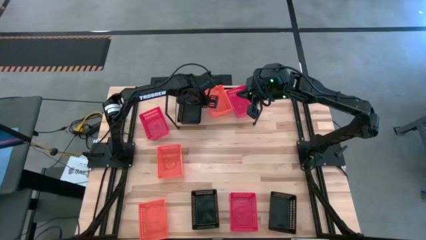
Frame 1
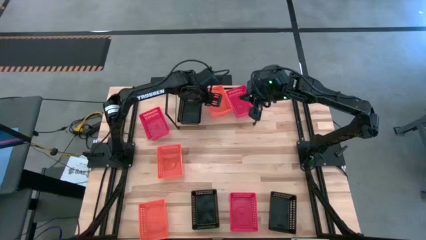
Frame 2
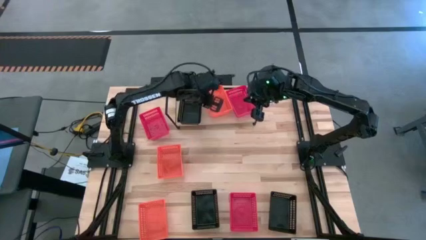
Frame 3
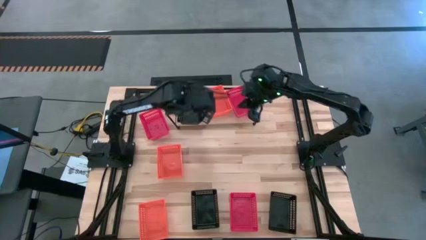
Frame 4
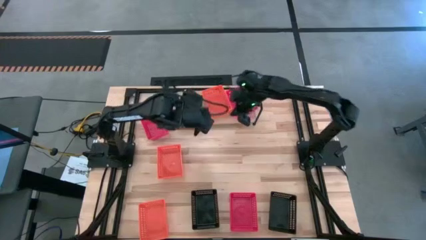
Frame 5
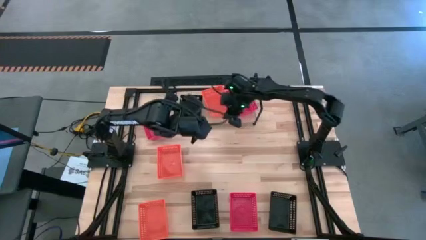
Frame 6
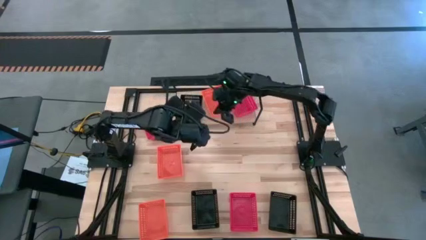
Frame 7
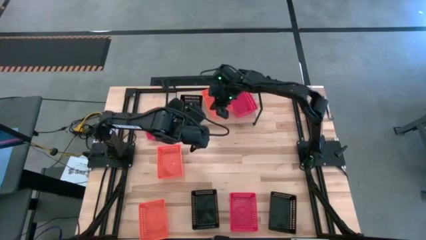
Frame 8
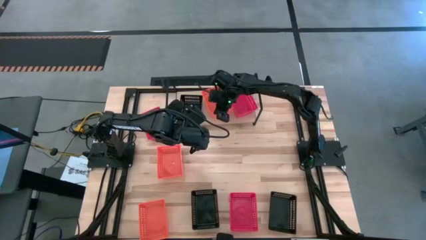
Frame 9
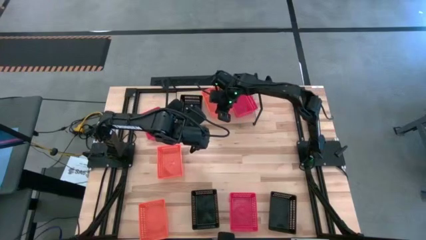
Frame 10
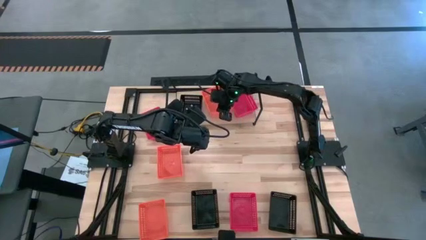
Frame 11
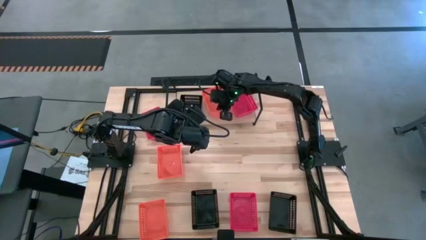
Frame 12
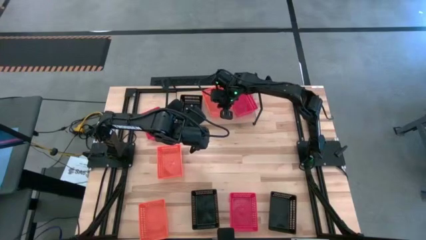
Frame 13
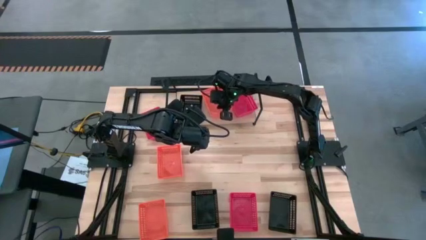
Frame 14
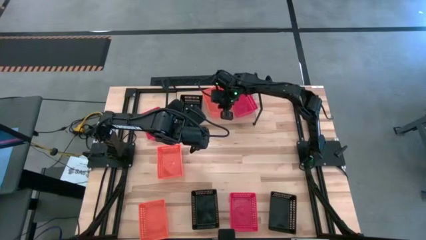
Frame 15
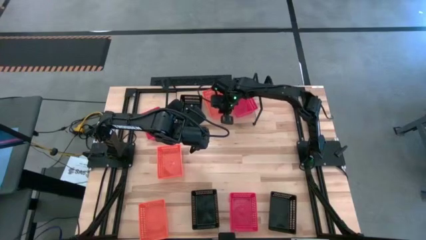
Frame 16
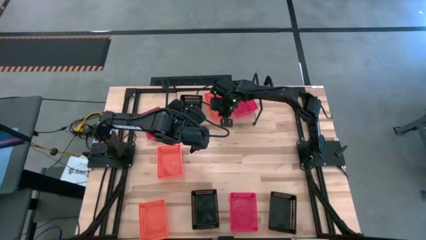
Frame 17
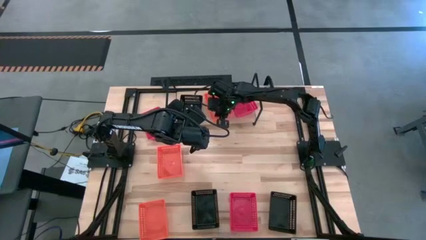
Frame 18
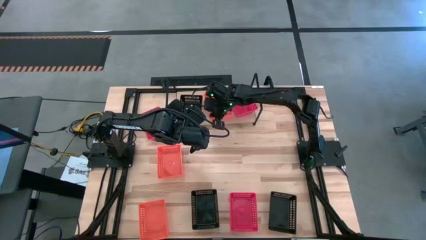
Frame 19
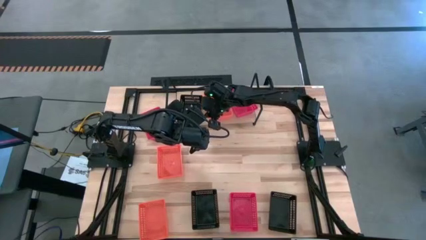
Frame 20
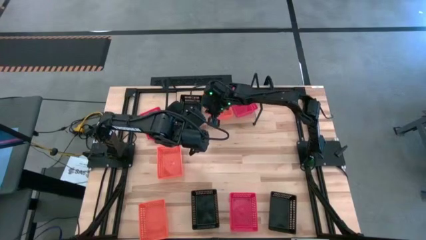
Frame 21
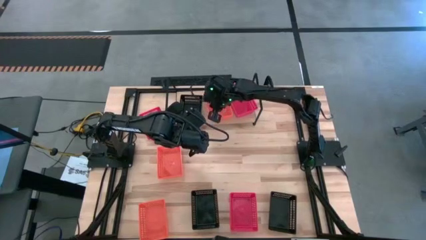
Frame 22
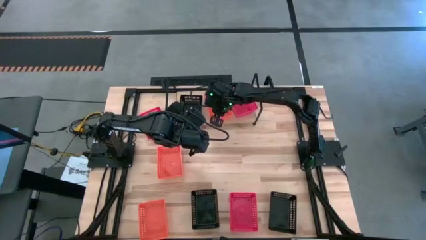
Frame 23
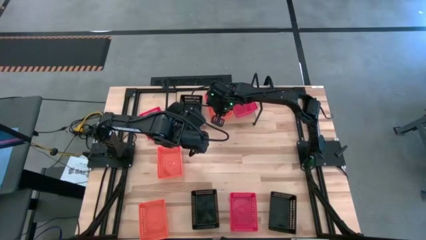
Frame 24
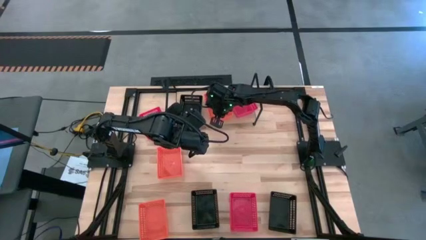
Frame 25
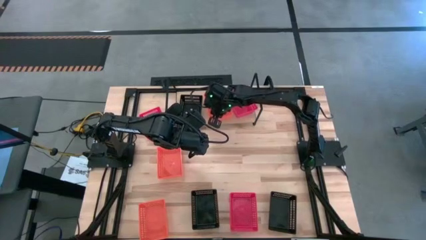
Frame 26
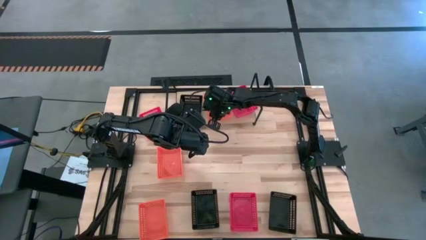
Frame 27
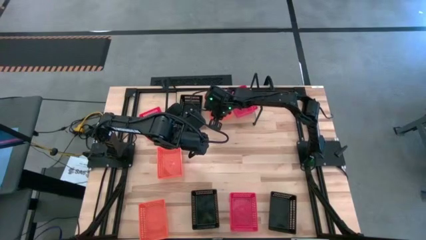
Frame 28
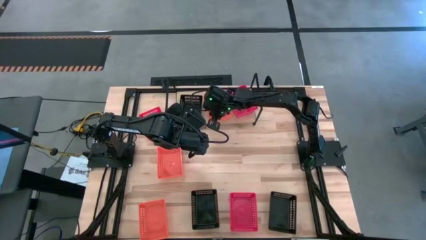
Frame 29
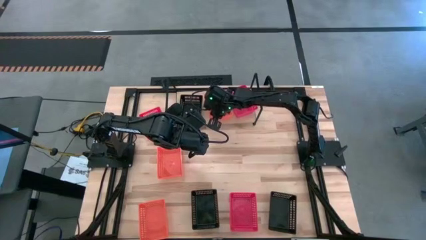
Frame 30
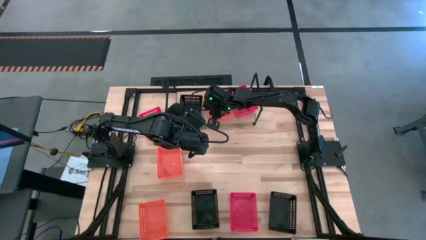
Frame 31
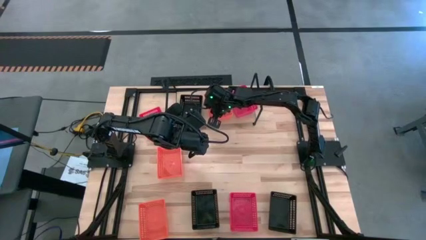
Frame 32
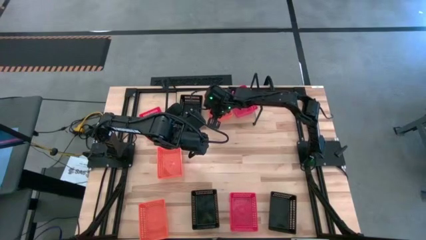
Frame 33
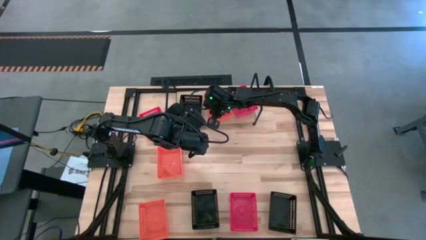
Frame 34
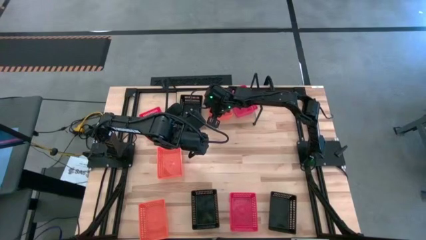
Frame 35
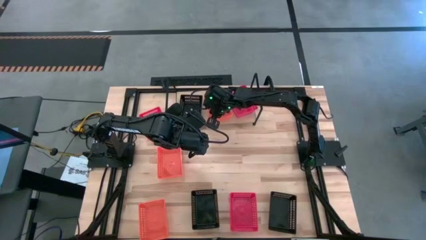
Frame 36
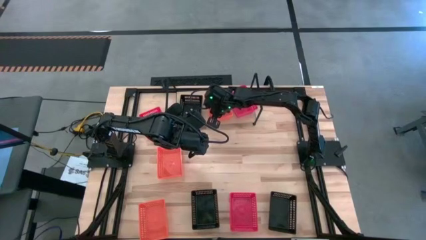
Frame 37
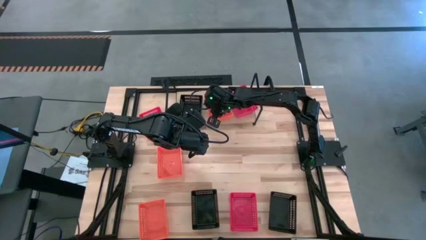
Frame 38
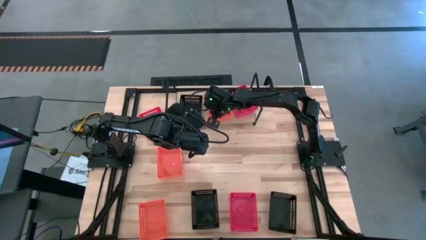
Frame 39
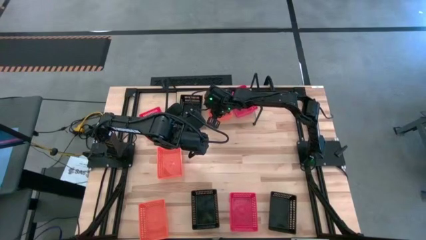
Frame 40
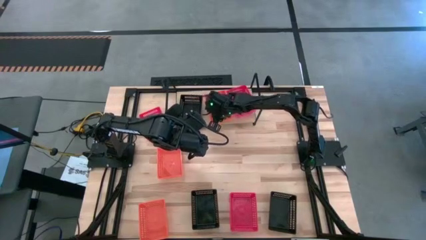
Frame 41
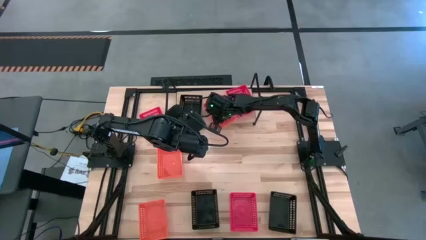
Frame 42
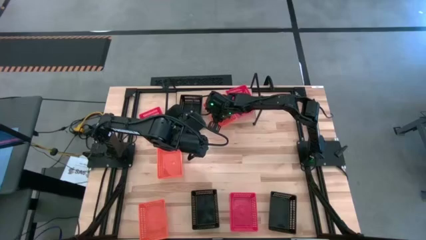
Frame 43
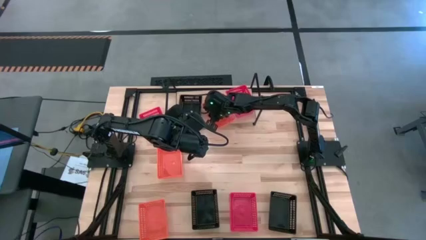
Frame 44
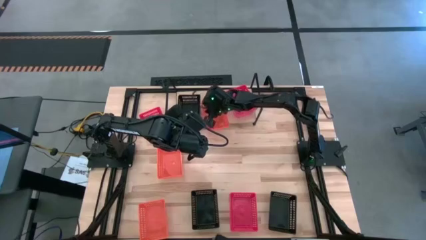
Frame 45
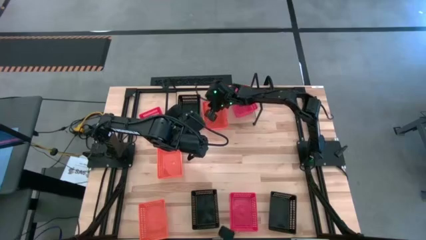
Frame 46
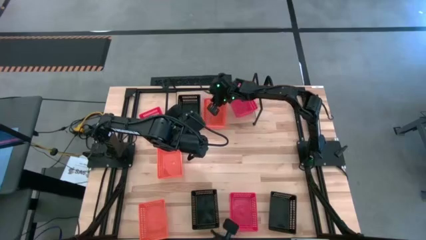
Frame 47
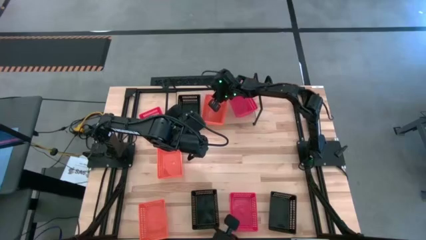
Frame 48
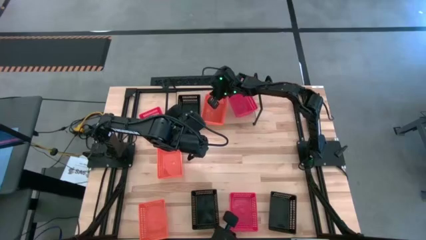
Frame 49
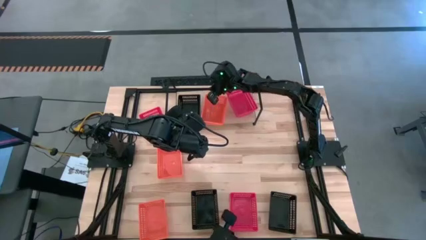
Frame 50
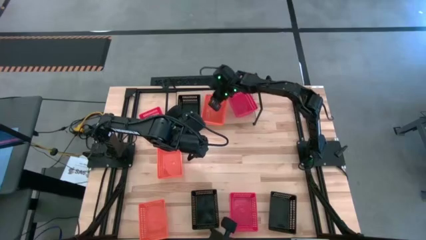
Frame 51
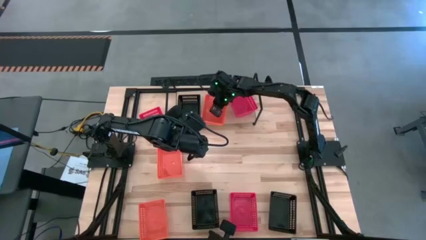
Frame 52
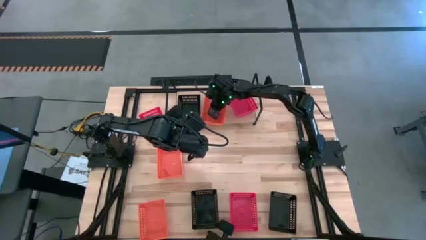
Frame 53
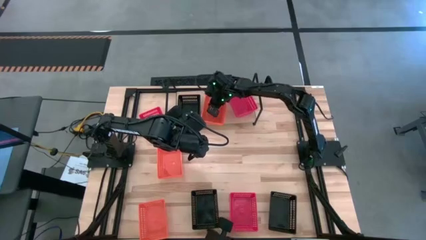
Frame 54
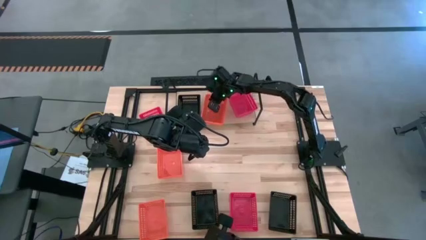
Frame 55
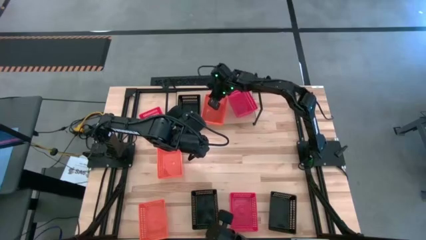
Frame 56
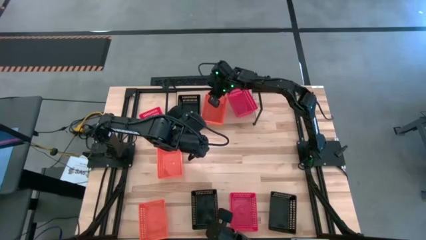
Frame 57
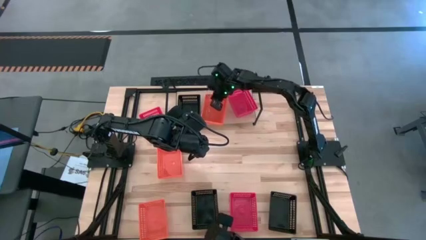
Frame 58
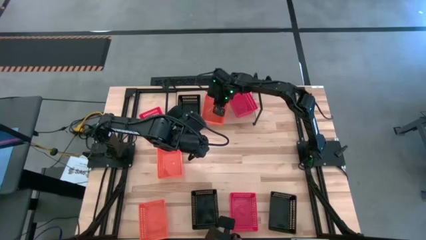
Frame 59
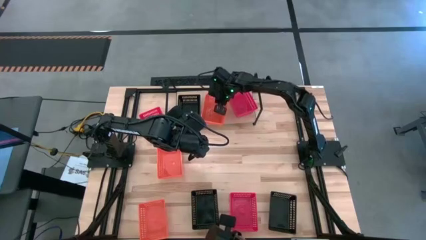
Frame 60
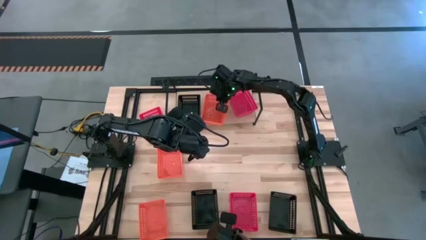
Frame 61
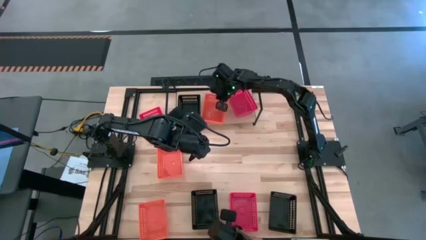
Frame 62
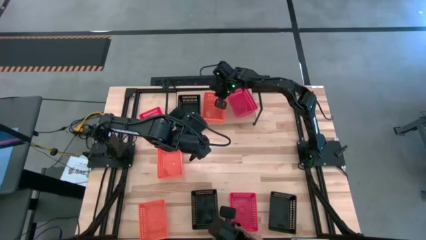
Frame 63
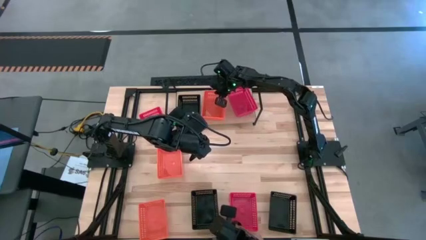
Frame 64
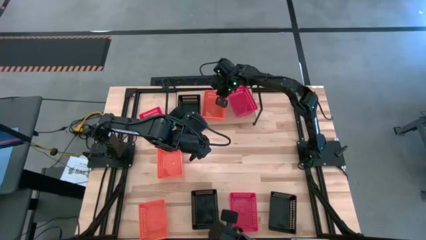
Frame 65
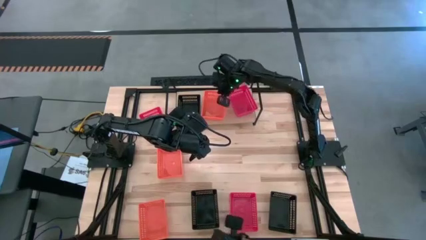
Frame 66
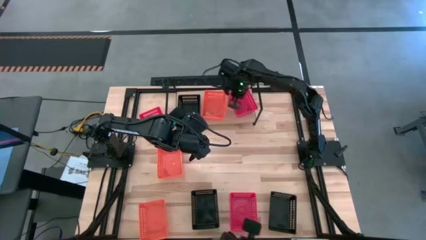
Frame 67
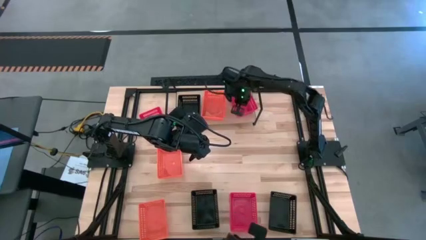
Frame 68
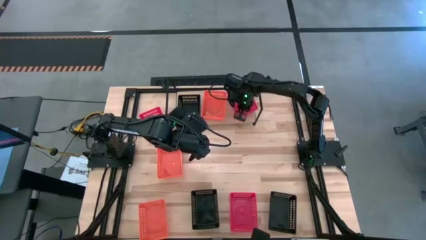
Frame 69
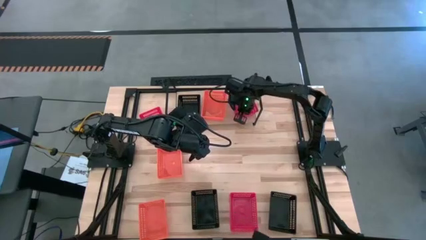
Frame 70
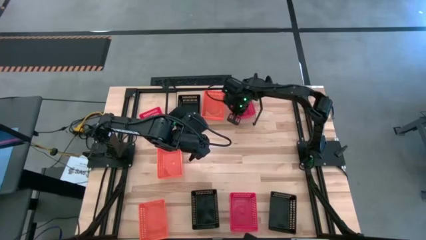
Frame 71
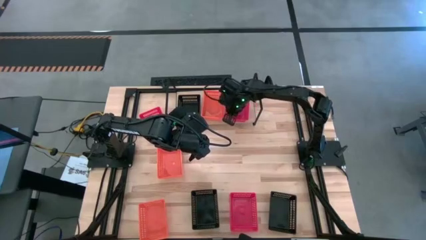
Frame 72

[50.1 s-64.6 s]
Task: Stack baskets on shelf by color
Adjust the bins on the shelf
